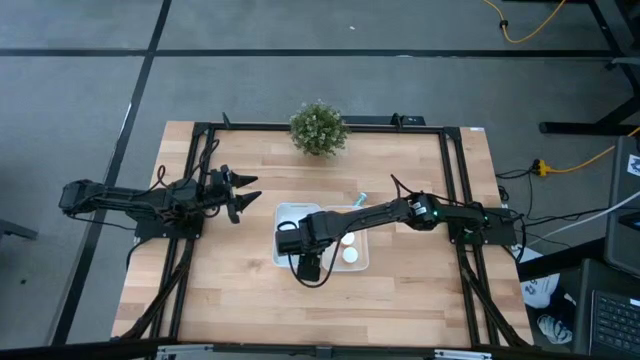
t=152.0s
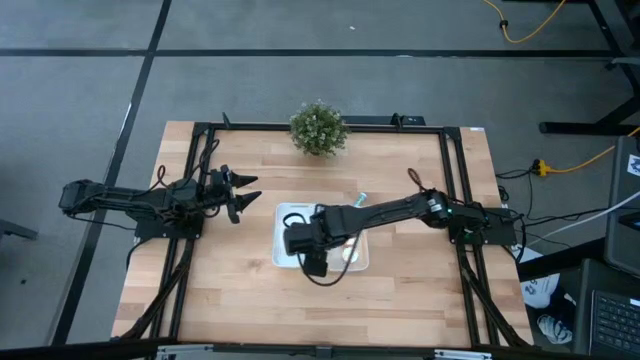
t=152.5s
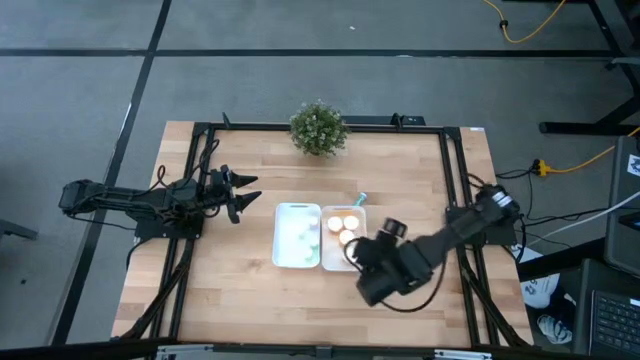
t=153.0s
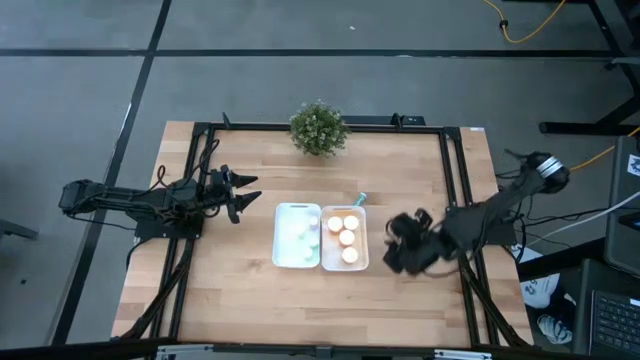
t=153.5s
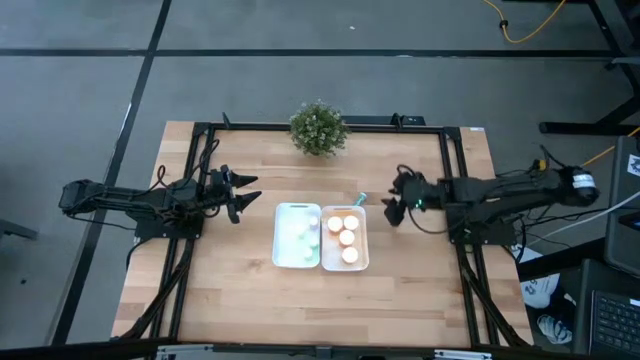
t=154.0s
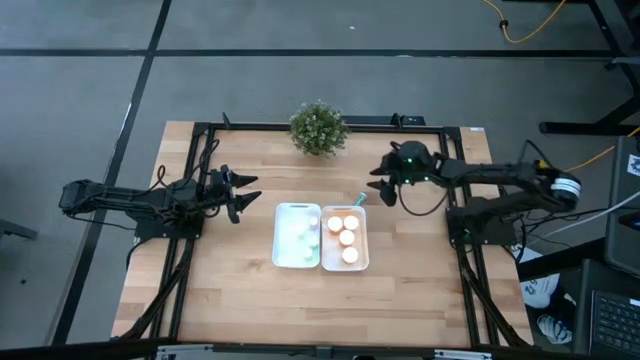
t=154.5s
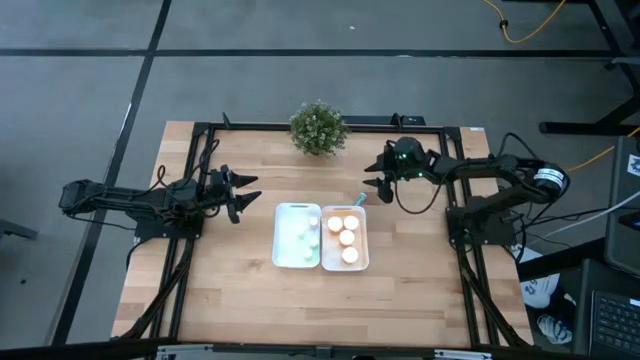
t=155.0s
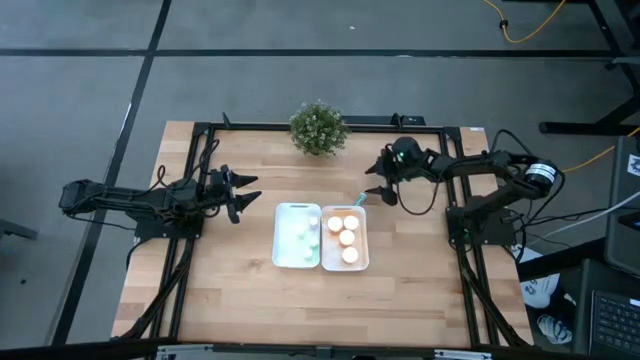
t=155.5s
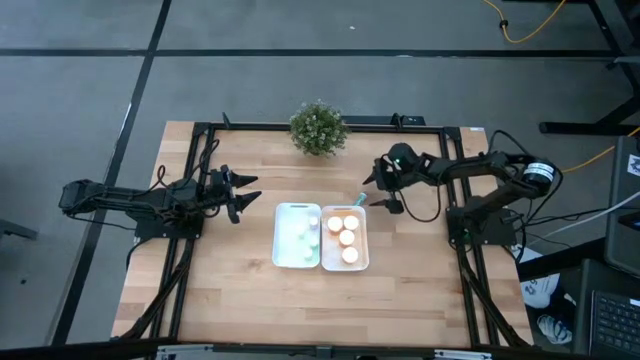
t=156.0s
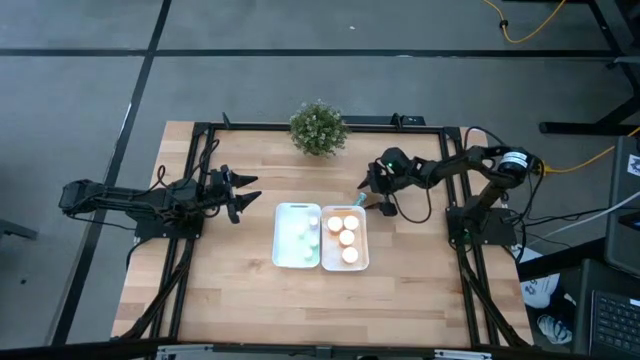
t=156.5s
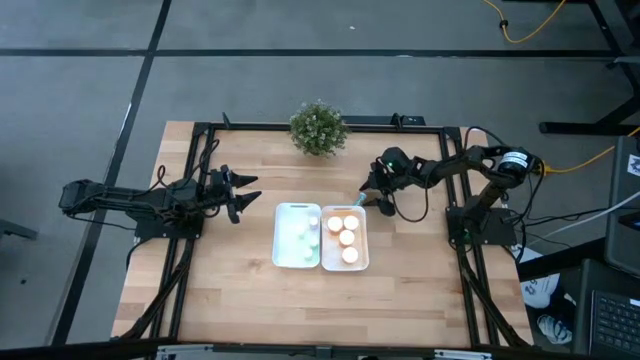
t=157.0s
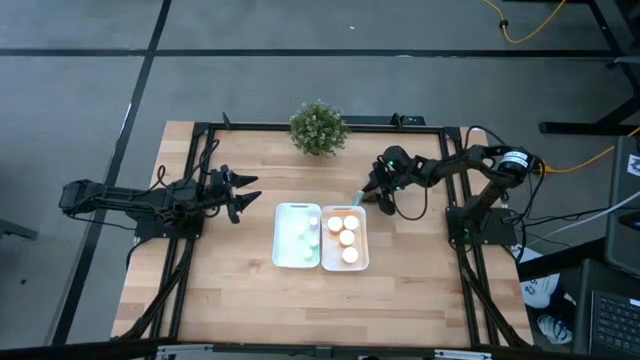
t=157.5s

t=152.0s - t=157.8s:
Task: Pick and place medicine bottles into bin by pill shape (circle, oval)
Put the blue tablet bottle into the left white bin

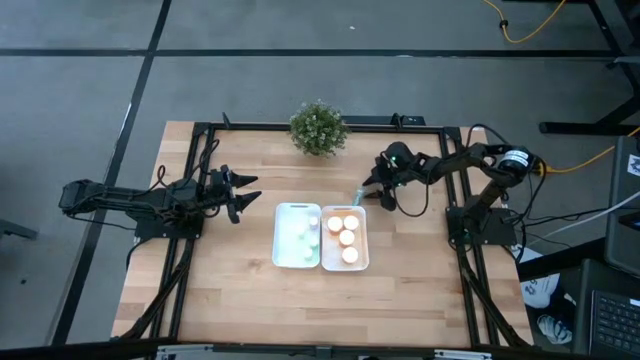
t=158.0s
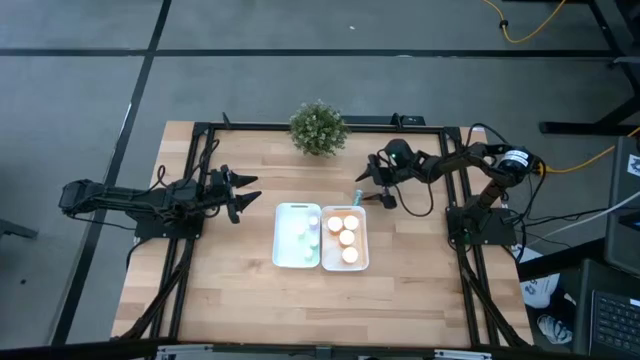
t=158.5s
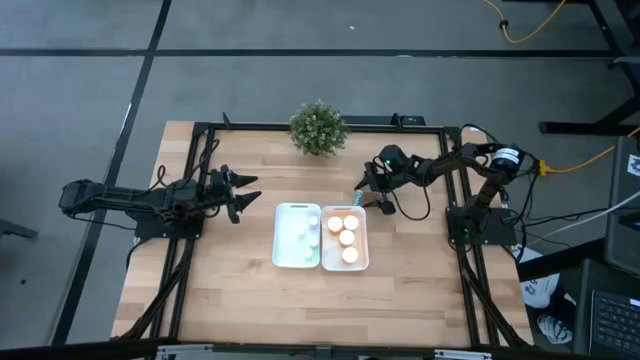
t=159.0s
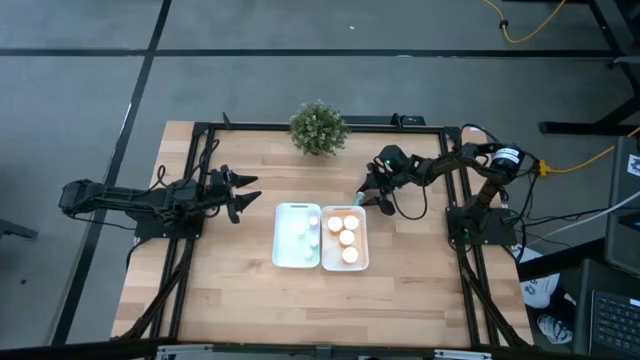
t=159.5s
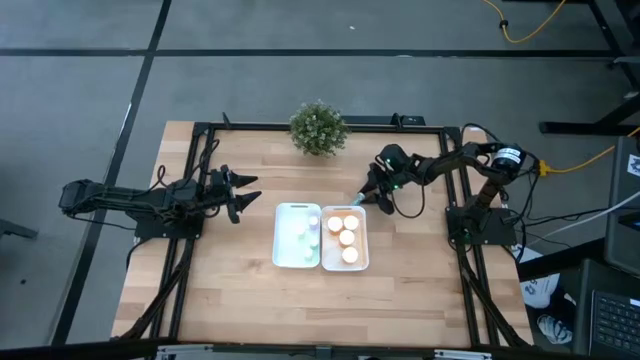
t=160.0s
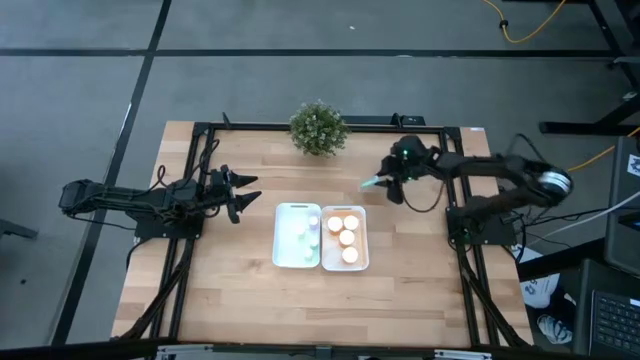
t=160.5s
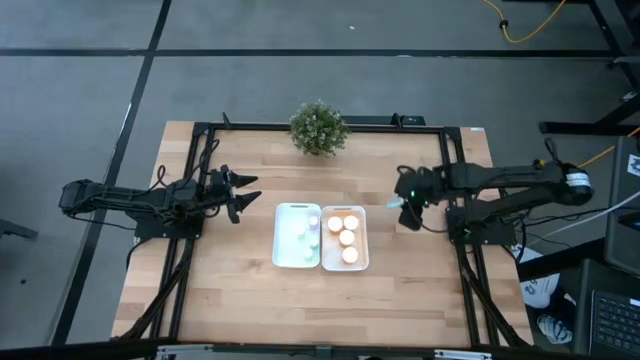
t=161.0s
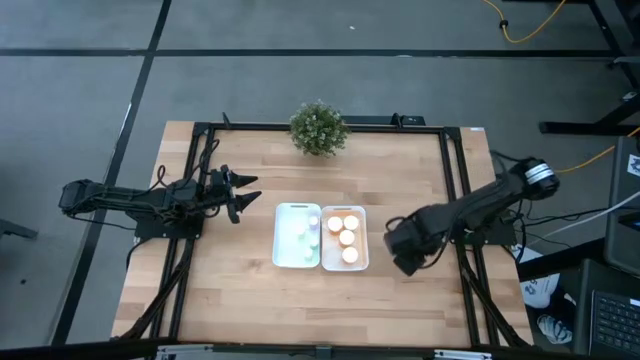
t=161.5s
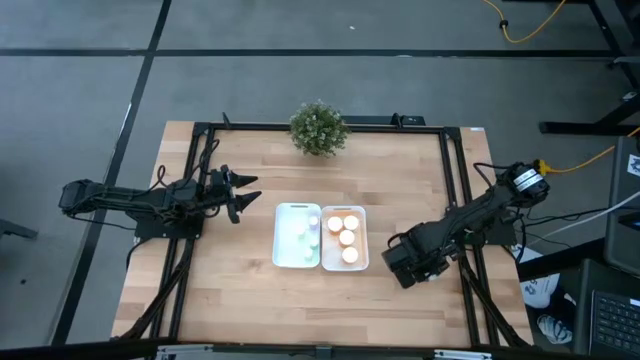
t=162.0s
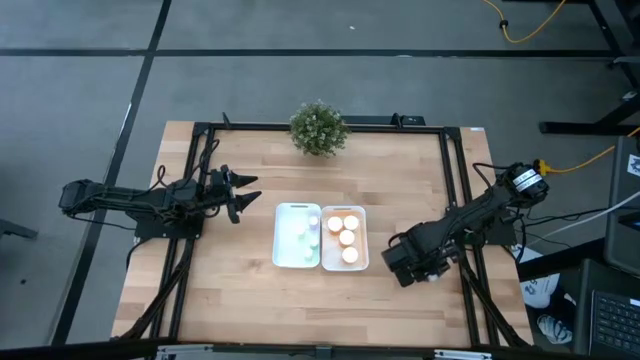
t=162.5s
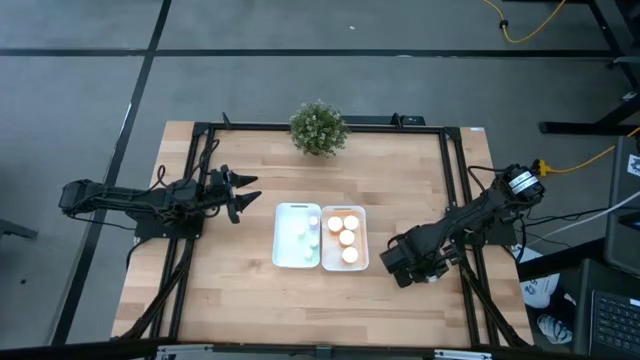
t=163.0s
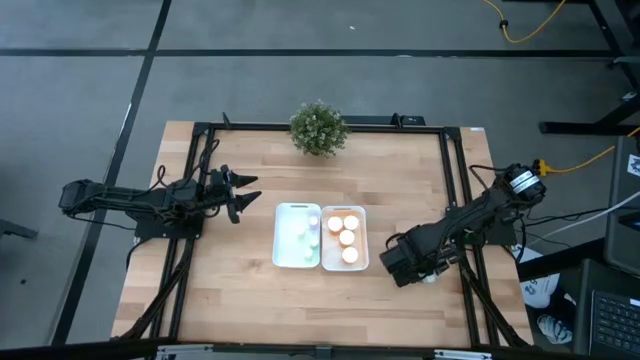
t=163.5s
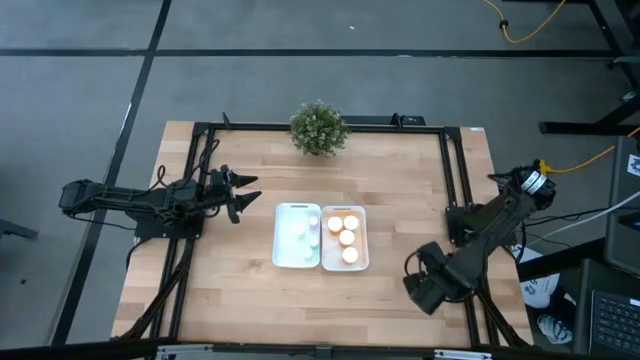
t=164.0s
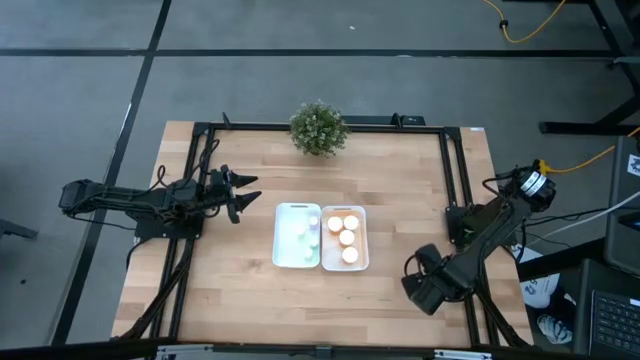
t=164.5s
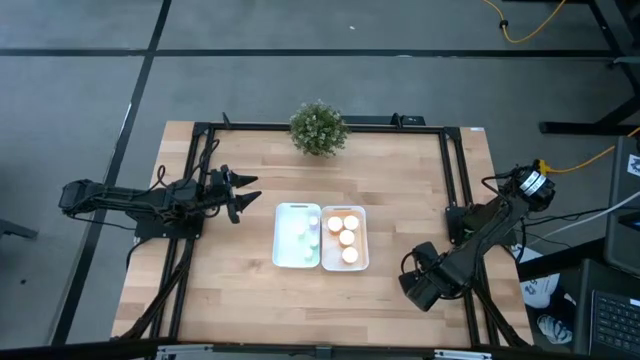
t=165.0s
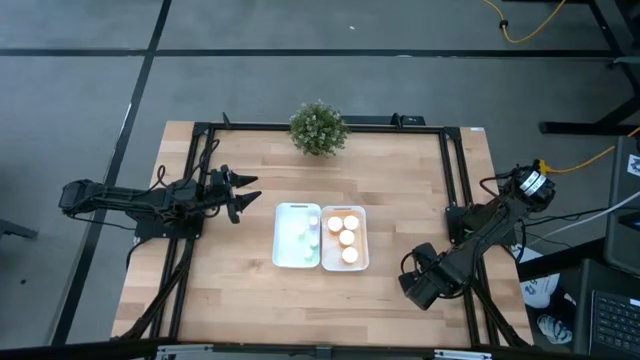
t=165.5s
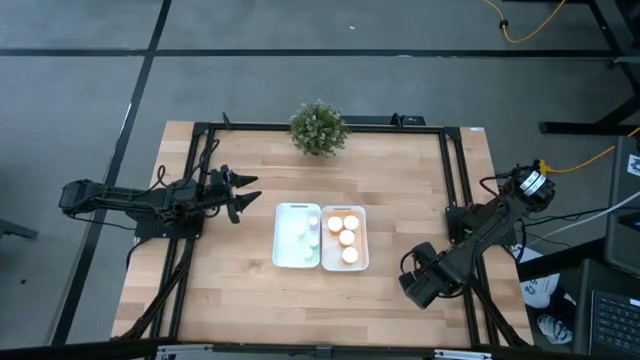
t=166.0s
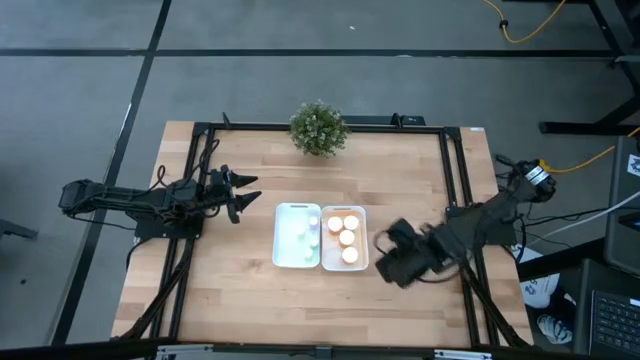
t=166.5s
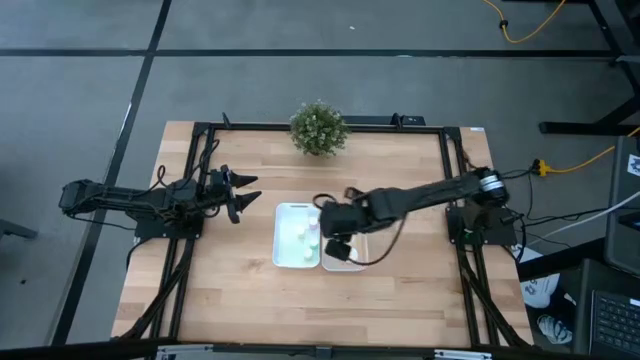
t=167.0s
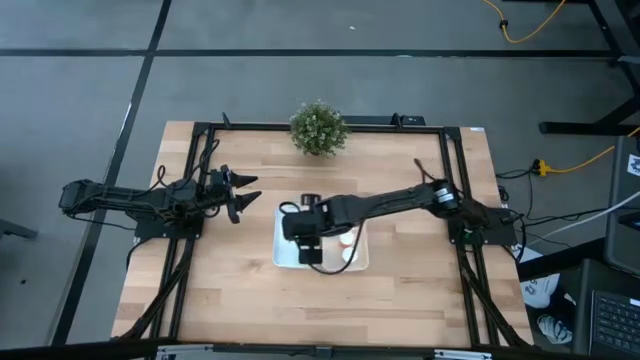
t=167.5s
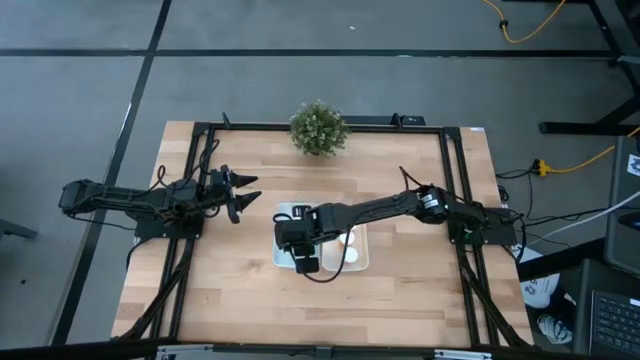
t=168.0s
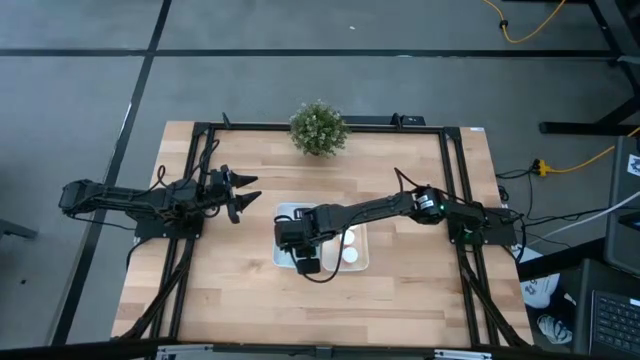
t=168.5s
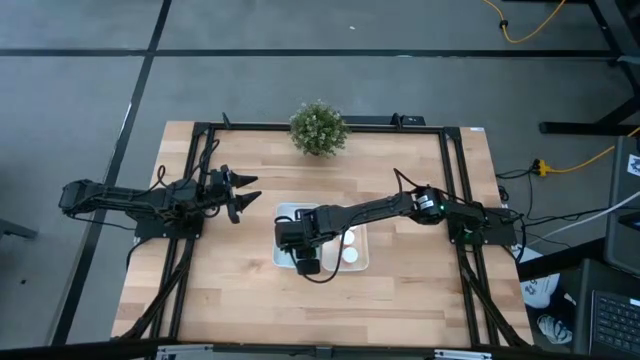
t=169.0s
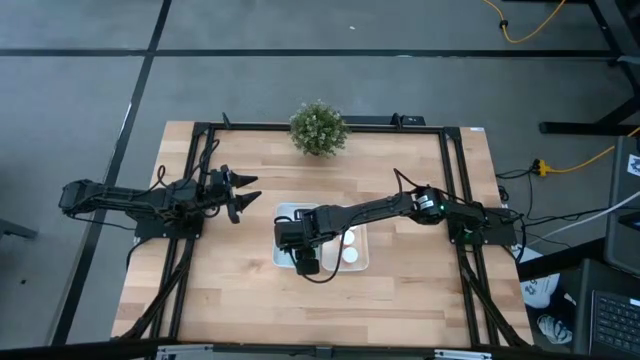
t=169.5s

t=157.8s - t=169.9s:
Put the blue tablet bottle into the left white bin

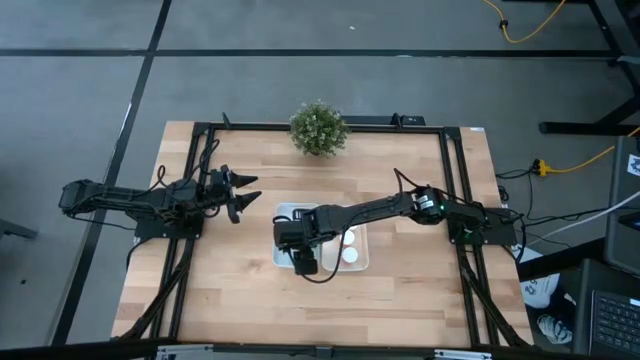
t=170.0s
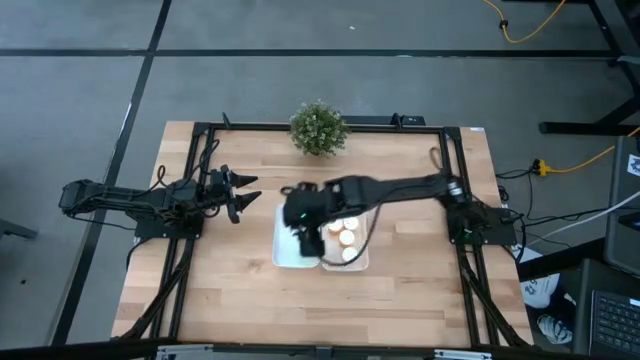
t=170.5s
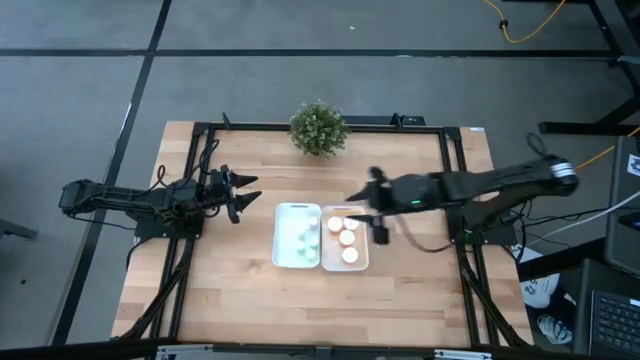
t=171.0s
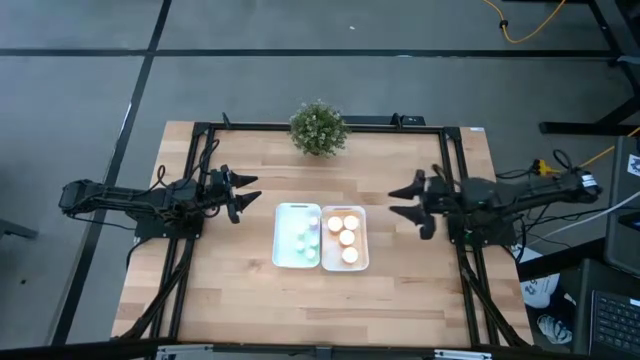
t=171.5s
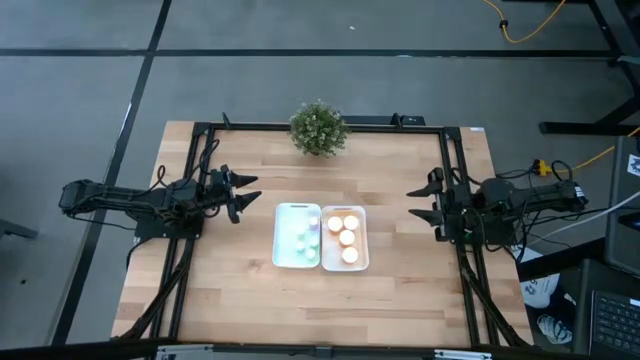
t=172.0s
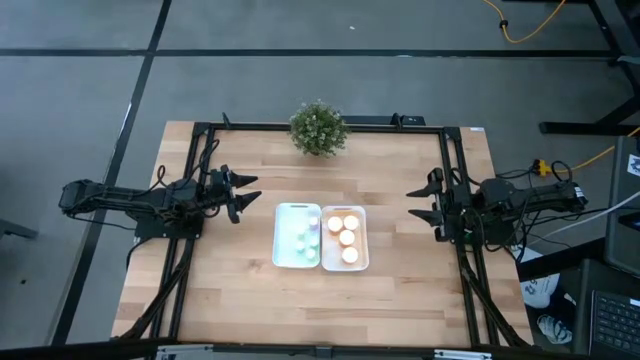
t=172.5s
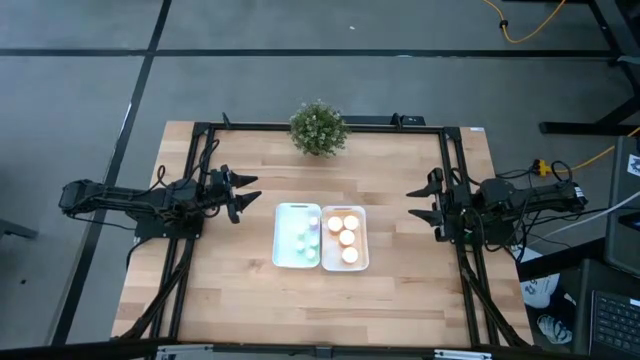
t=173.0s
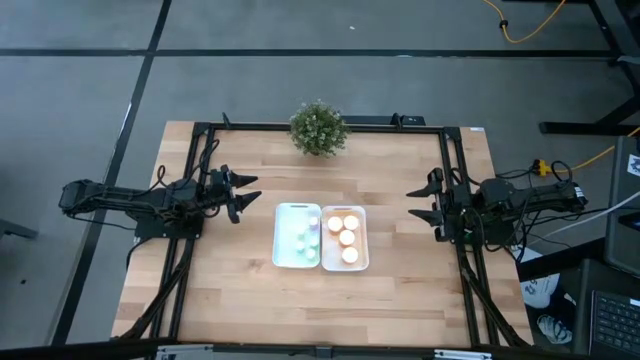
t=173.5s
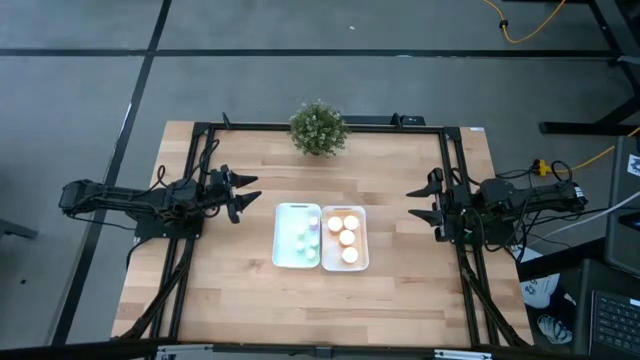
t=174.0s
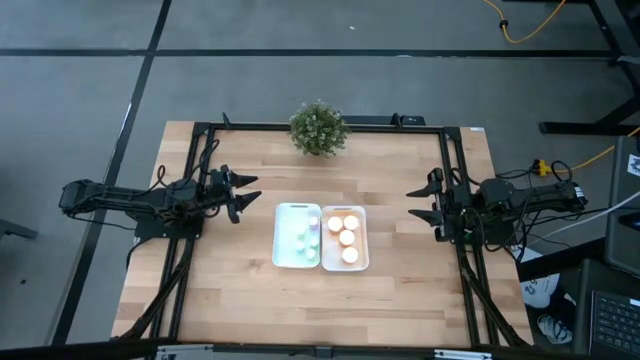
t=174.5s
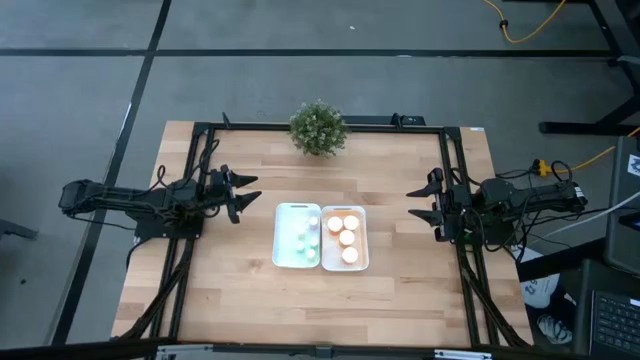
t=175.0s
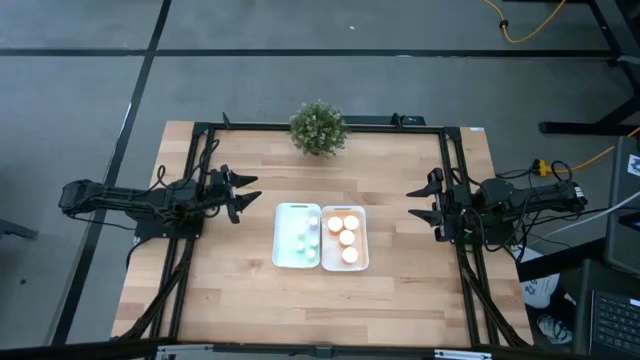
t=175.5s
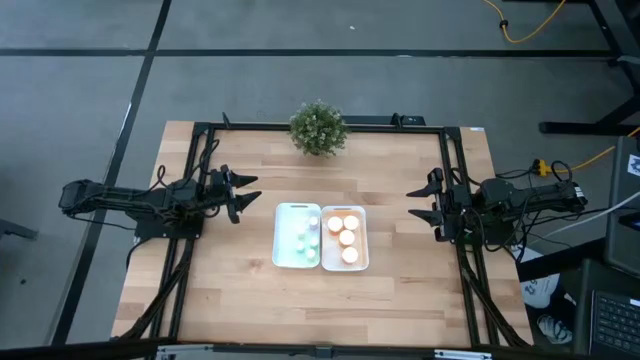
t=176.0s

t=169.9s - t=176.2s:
Return to Home Position
